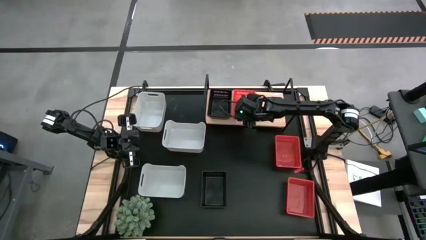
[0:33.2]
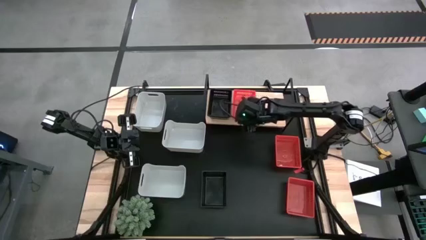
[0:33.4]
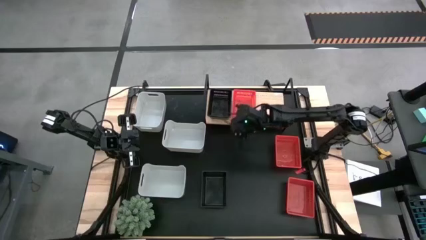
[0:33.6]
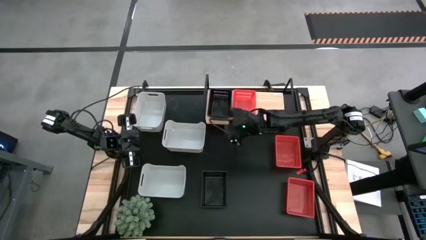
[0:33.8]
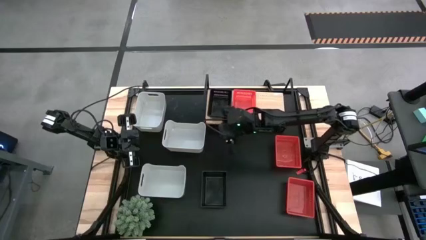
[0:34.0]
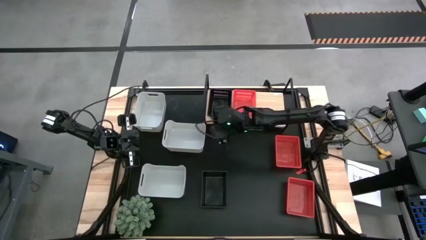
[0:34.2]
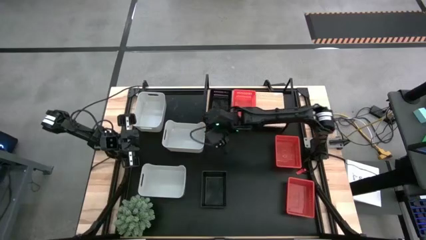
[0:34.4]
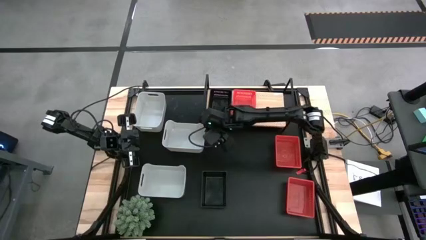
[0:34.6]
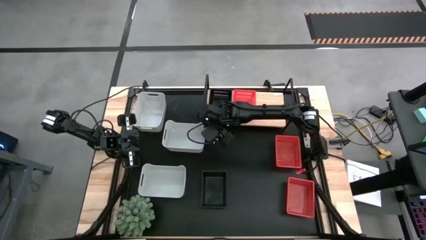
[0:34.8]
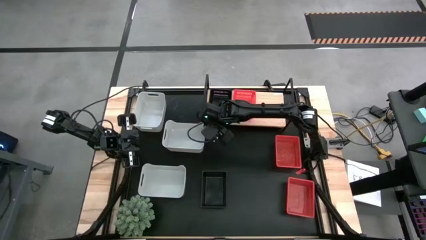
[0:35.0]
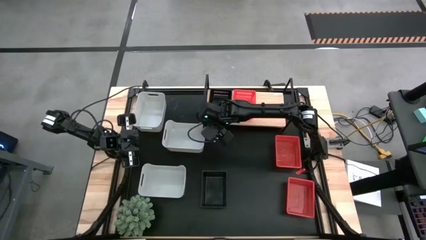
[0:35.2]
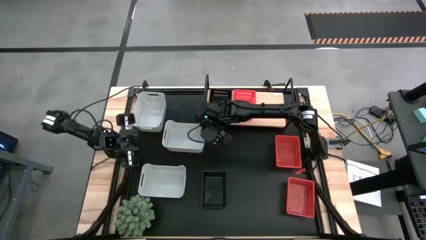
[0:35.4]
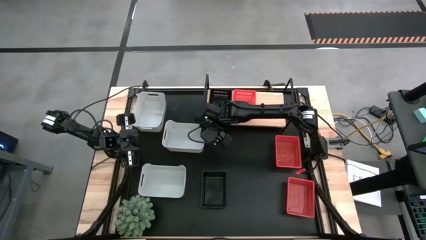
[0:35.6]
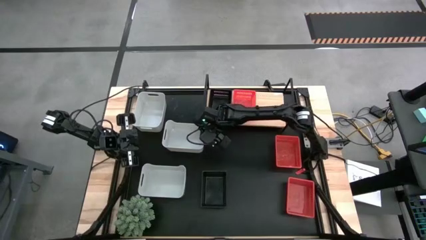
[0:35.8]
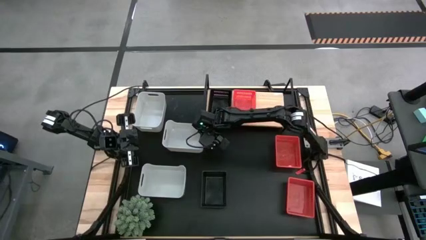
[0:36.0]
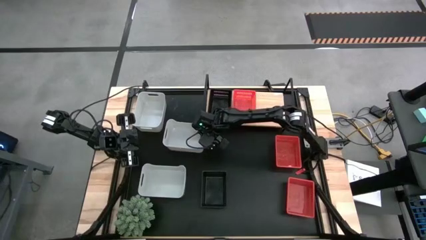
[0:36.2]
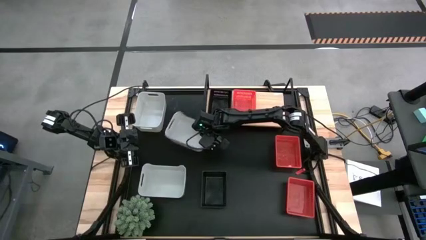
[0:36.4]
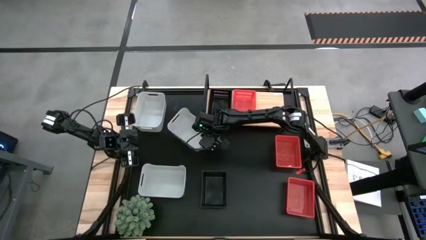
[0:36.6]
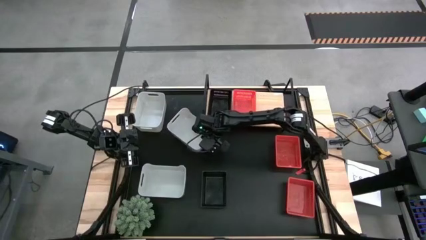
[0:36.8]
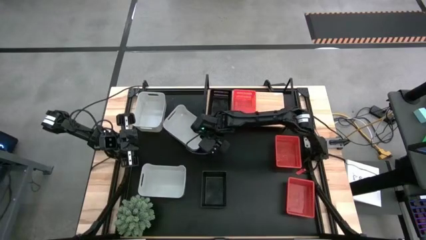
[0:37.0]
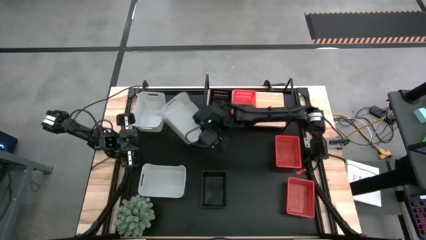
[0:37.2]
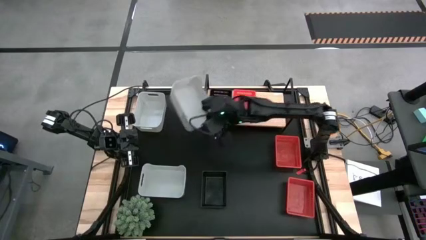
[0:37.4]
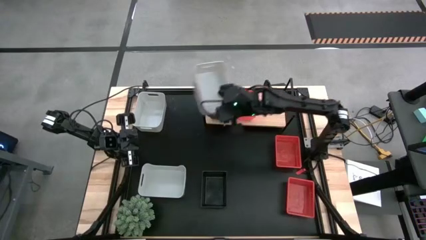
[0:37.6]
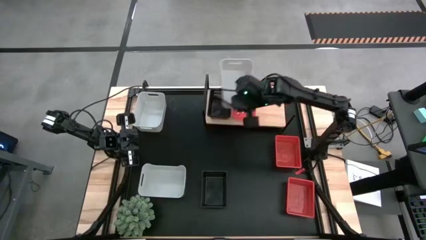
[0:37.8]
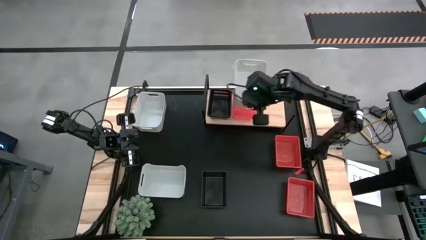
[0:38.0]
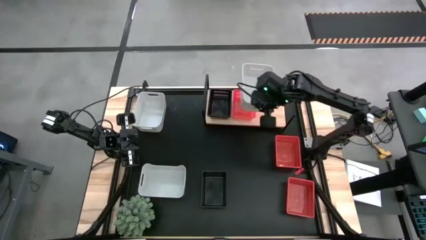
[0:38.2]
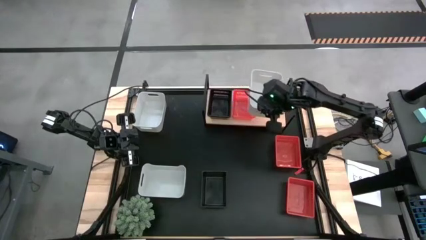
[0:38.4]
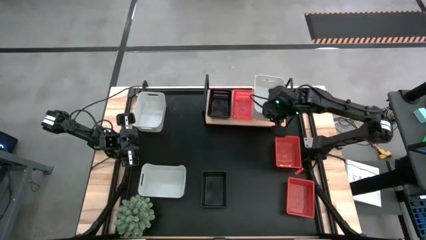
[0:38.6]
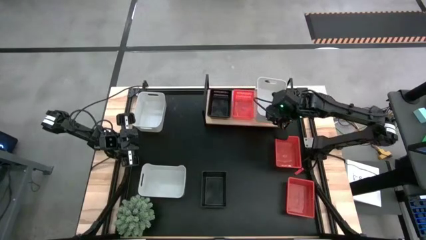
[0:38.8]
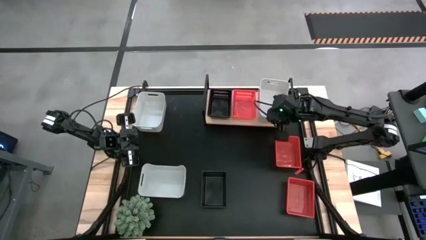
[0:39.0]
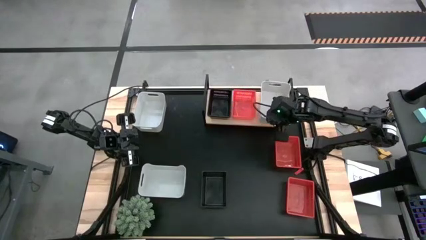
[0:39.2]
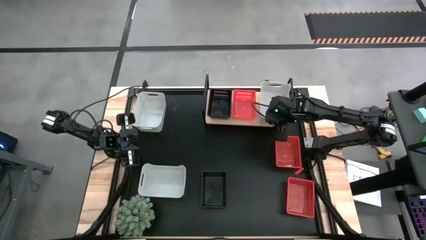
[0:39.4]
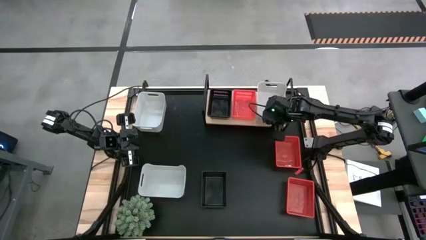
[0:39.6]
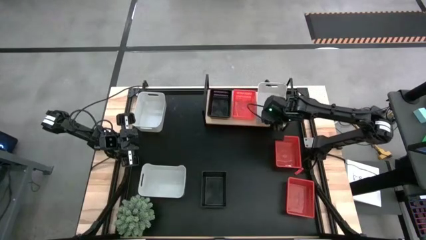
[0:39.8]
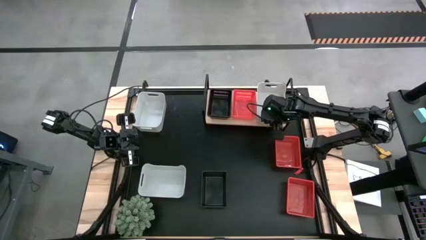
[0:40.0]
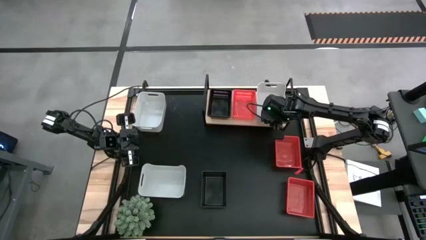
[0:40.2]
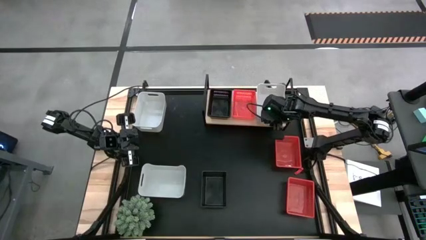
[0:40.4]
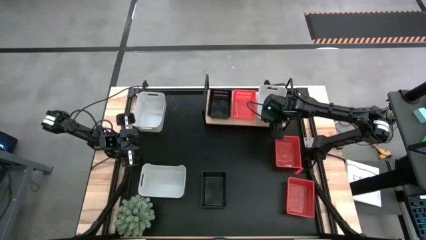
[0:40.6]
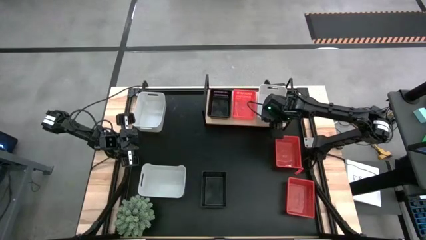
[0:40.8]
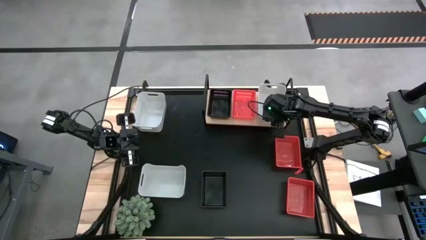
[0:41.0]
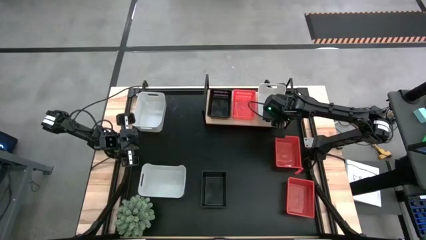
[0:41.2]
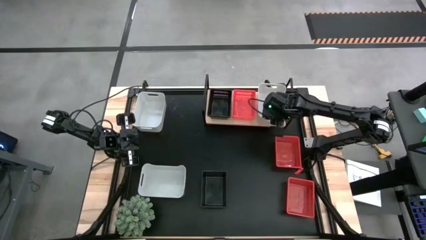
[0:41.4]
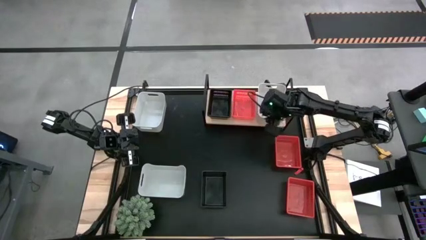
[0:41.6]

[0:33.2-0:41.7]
Task: Stack baskets on shelf by color
Put the middle right white bin on the shelf

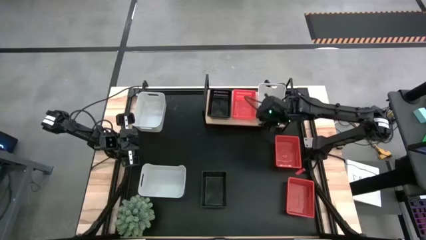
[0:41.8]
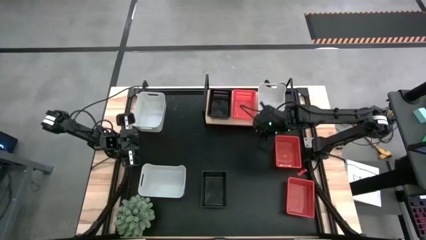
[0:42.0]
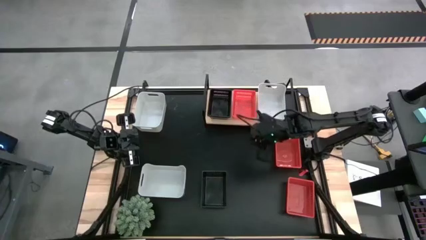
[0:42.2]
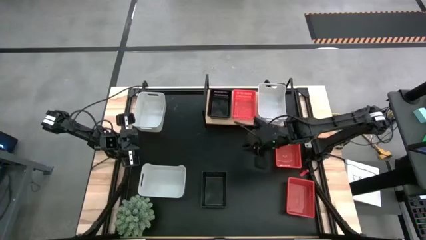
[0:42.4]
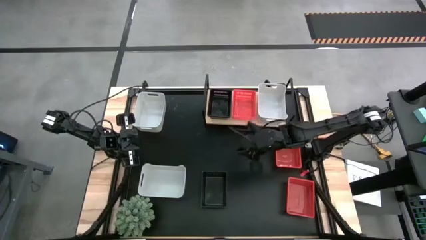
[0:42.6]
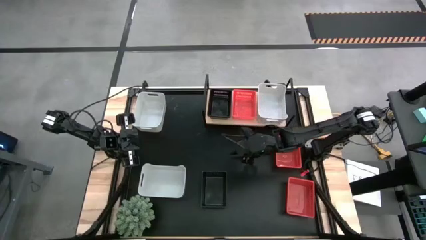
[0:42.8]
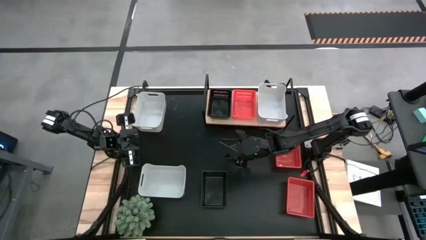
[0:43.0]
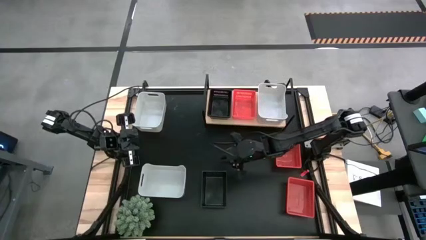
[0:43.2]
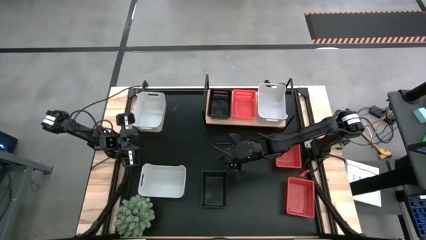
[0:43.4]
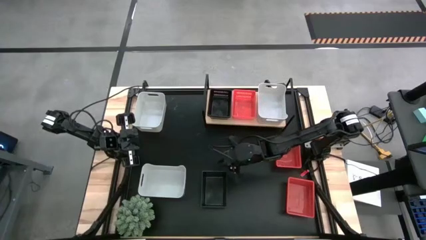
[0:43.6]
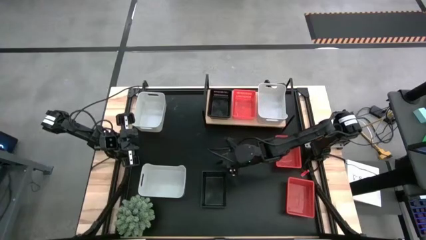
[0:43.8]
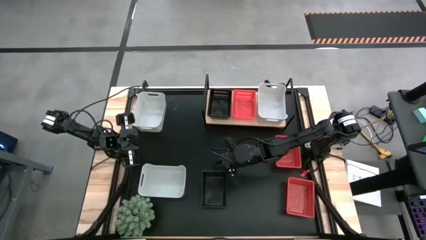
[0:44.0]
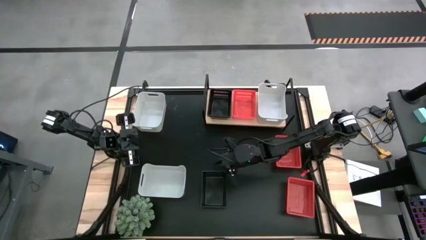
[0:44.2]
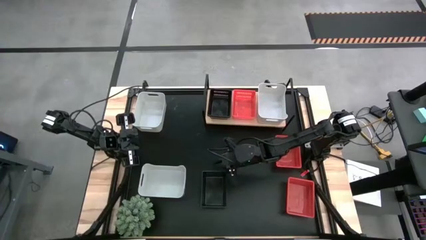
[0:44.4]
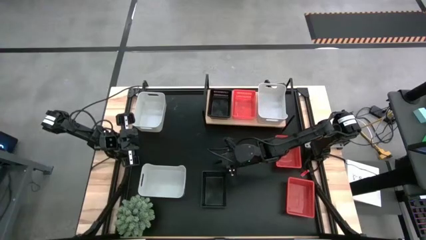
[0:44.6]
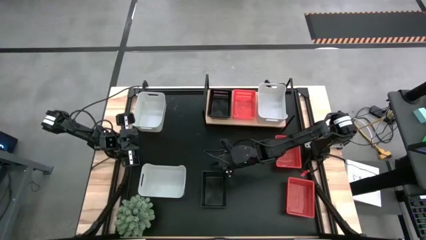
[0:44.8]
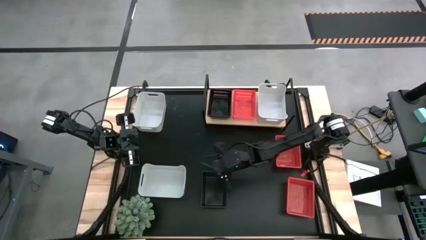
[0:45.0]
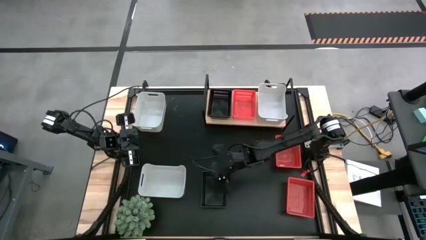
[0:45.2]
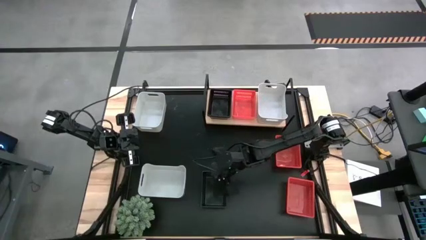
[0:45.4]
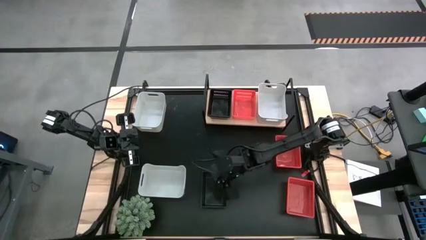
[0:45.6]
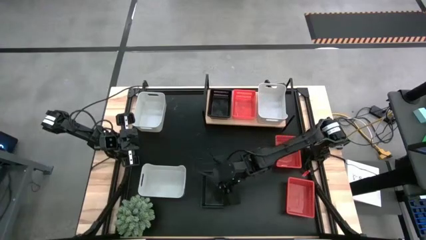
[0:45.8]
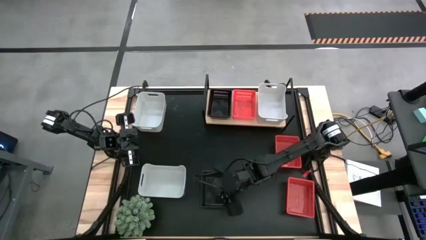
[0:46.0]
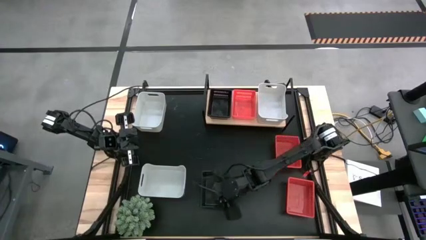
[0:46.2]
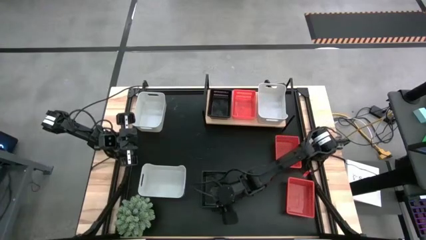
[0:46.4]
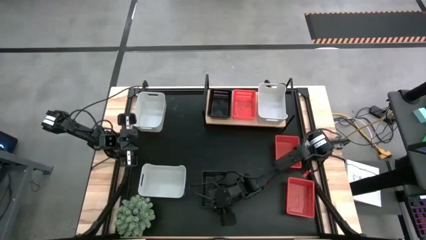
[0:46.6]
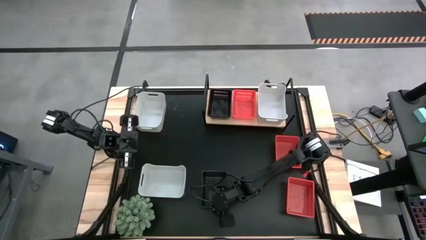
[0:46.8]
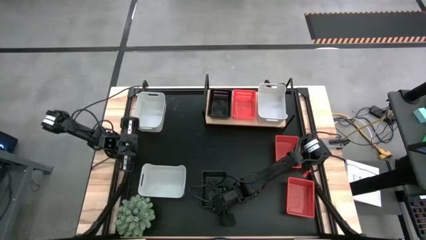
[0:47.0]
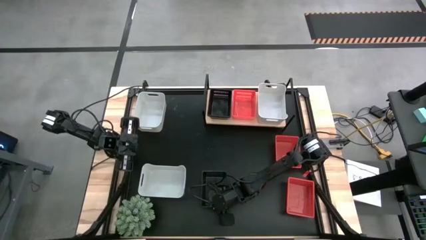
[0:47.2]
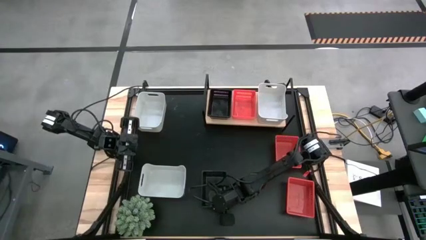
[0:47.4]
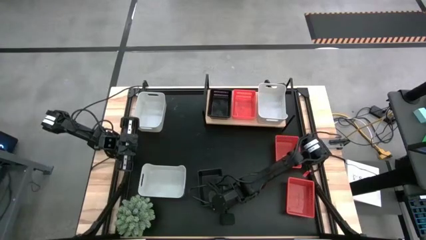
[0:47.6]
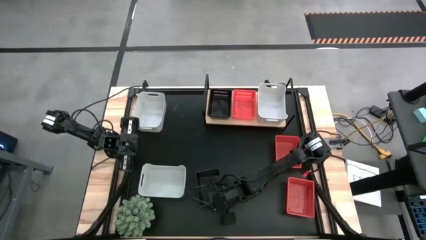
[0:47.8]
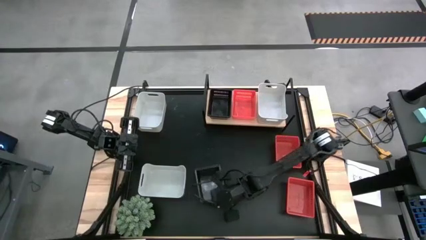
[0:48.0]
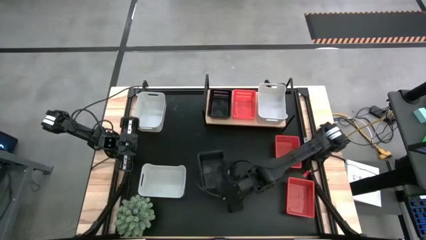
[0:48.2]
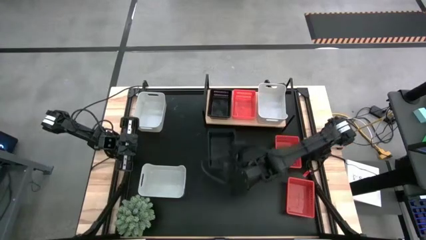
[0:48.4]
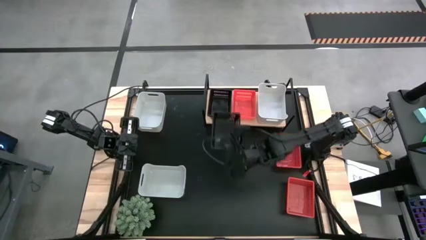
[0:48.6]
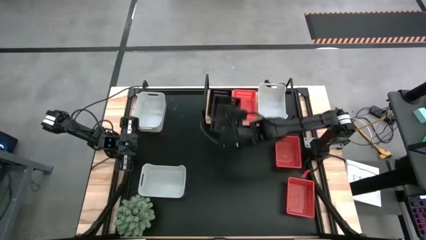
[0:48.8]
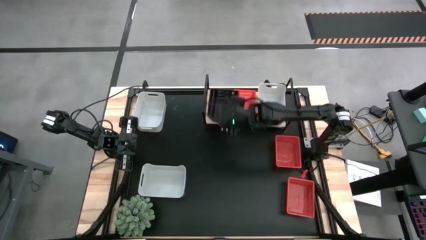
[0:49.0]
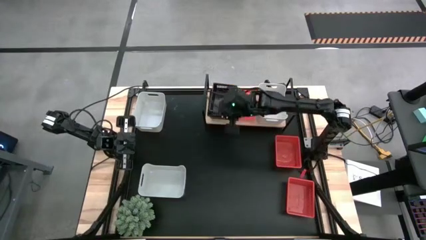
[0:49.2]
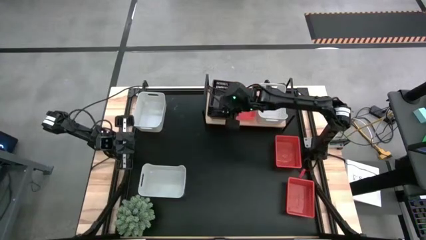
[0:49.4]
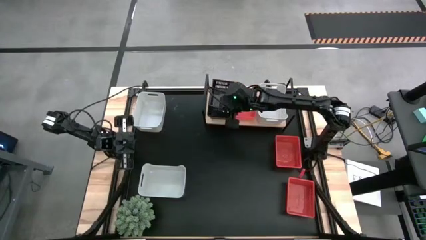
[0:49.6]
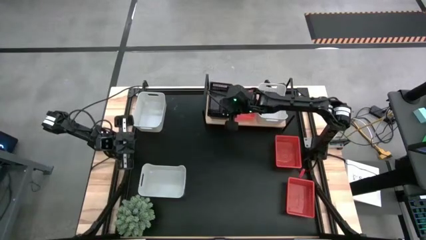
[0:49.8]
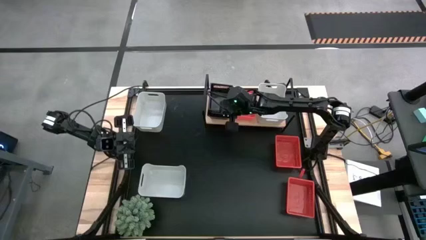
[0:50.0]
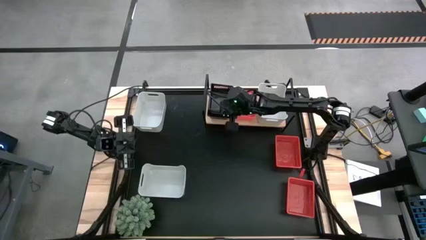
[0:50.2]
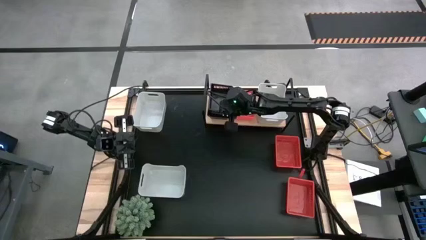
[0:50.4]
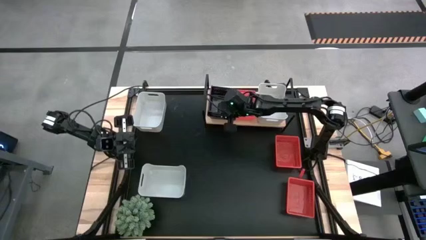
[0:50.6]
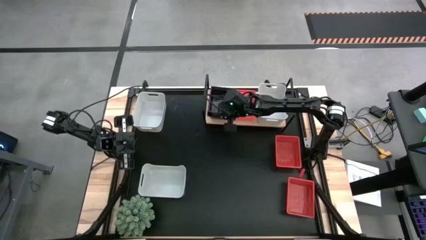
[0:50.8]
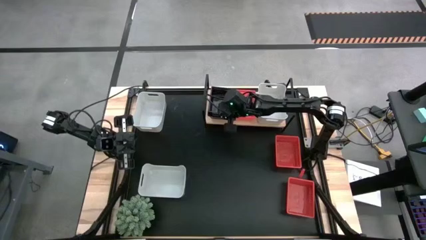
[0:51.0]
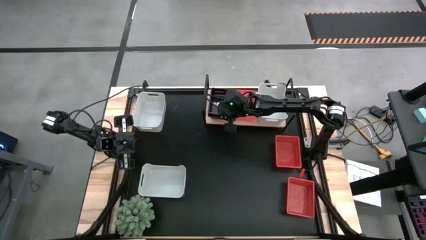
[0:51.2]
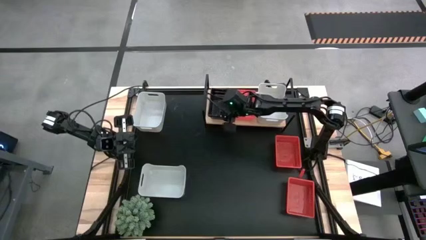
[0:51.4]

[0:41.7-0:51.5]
Stack the black bin into the top of the black bins on the shelf
